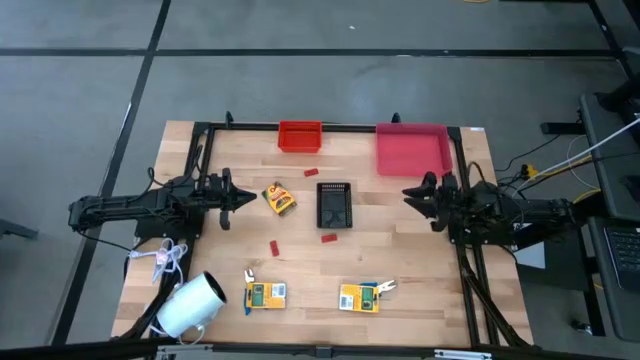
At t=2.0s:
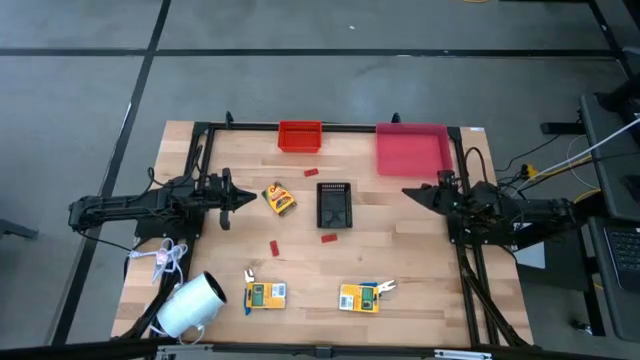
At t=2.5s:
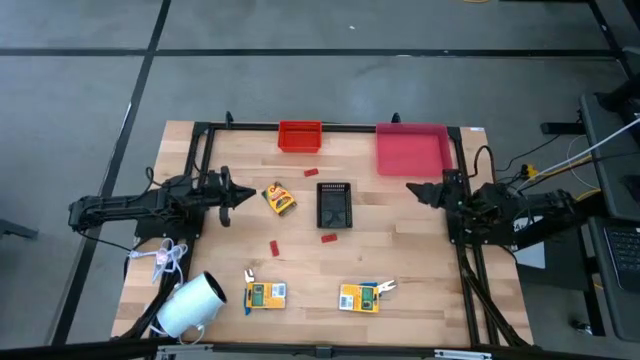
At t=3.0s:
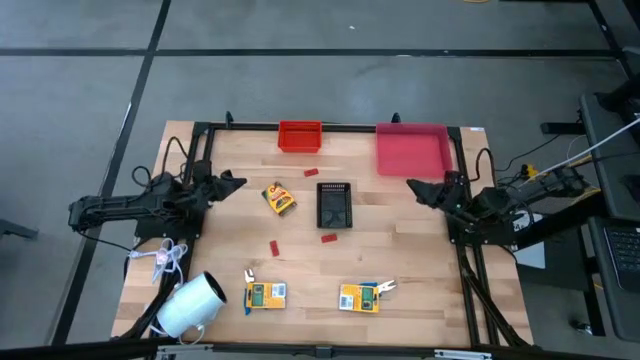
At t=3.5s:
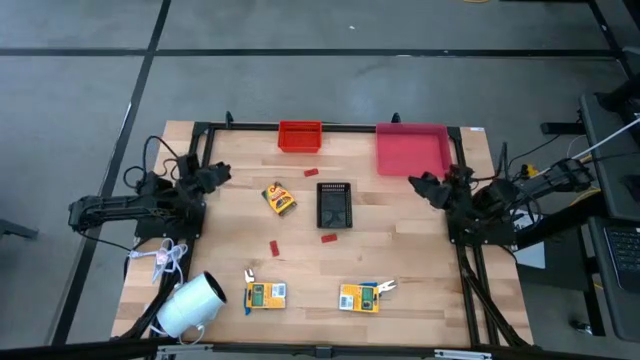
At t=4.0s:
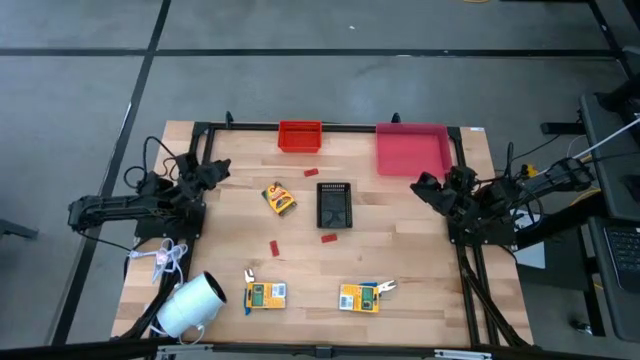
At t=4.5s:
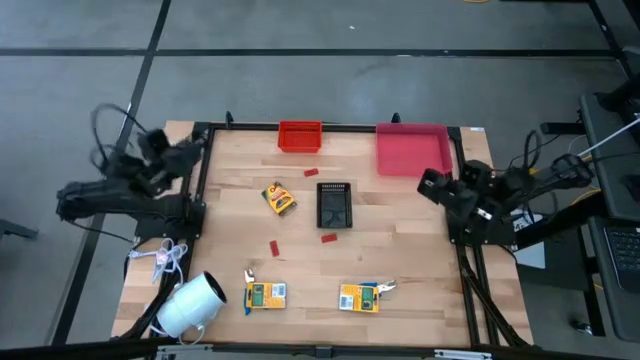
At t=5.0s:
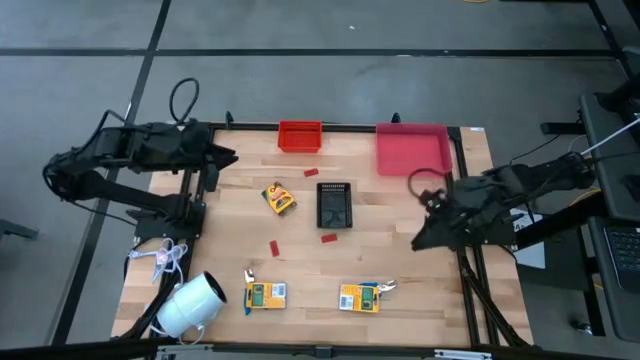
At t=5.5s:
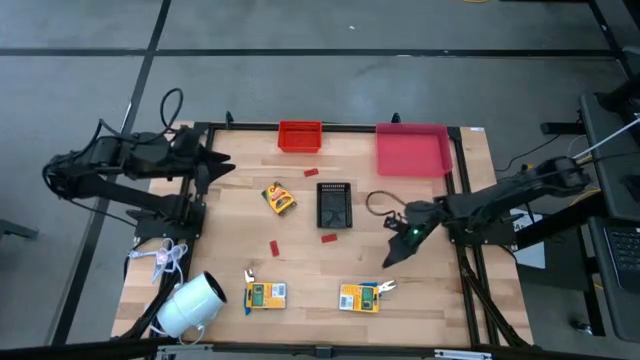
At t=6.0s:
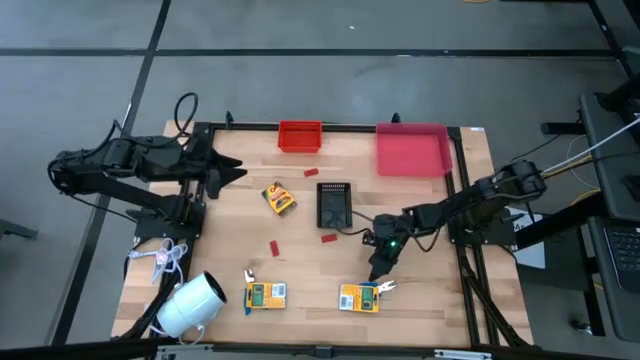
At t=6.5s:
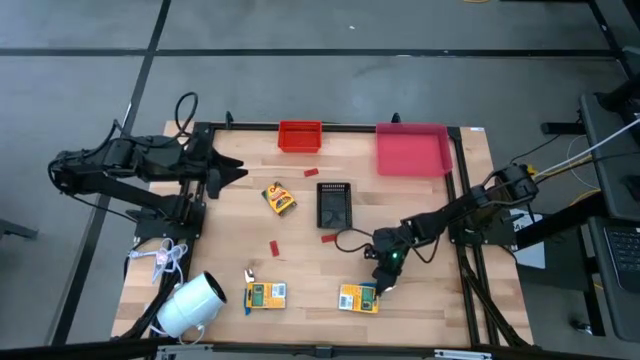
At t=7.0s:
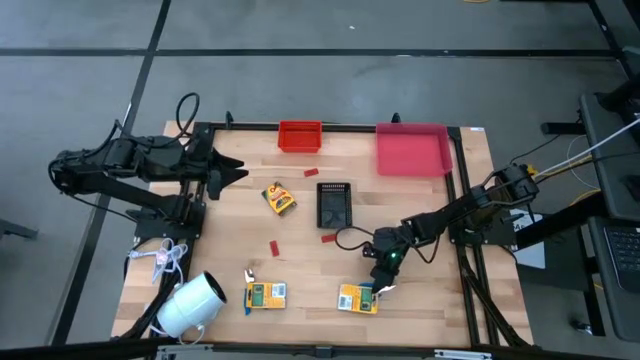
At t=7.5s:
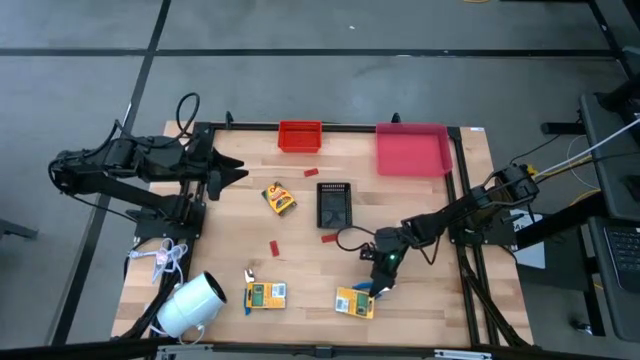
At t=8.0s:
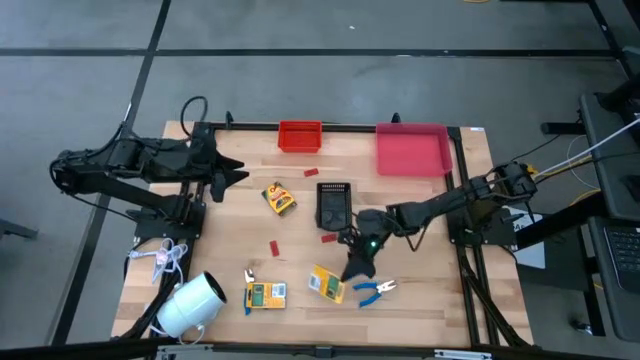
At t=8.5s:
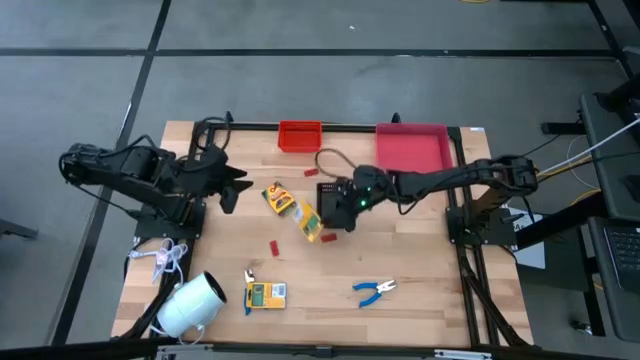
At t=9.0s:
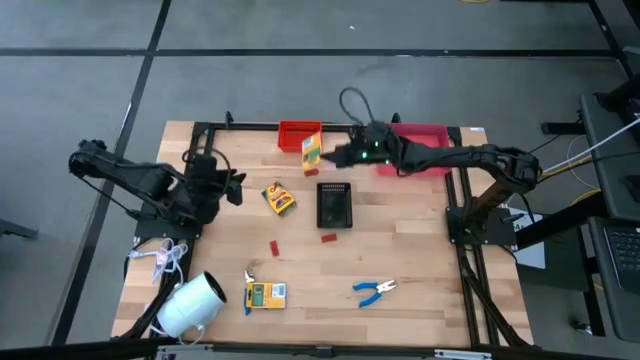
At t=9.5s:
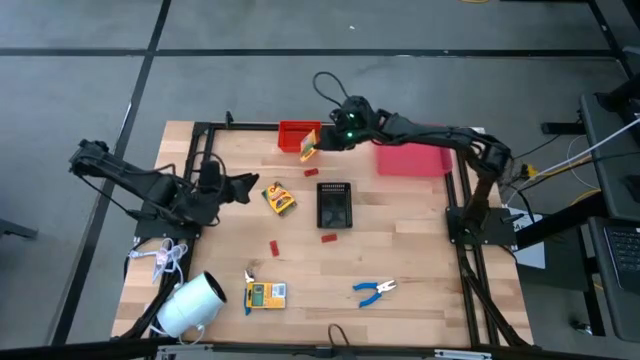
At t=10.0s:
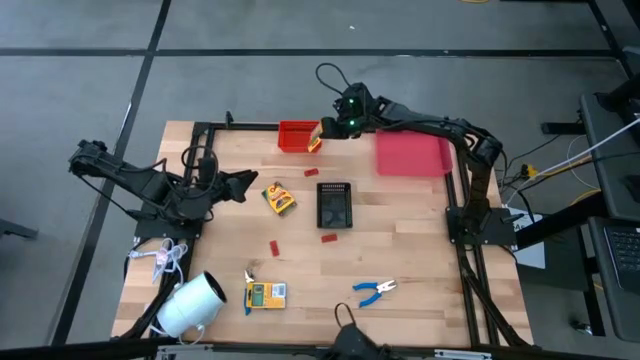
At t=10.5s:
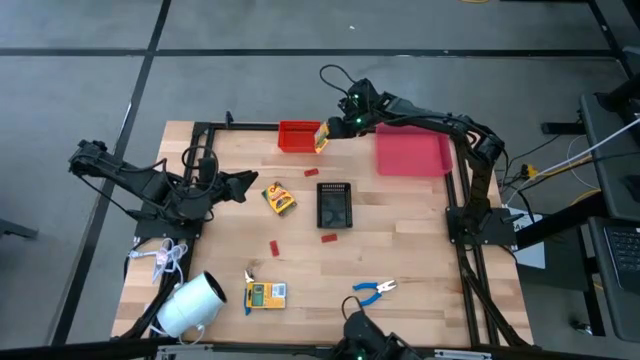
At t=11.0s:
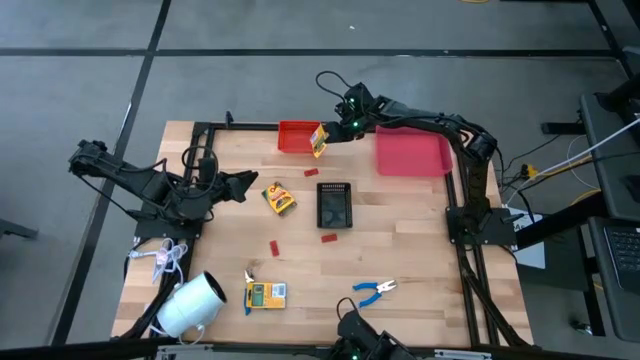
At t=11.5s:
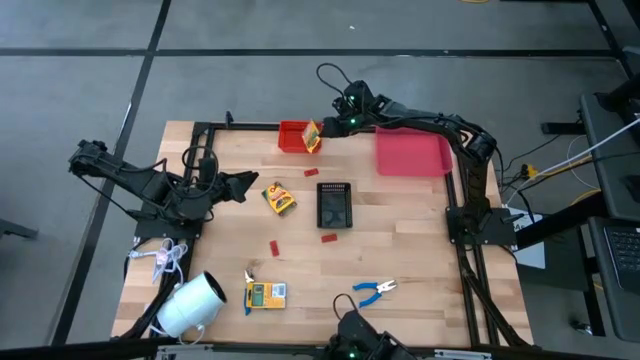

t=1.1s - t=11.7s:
Task: Pick & Place School Supplies
Put the yellow crayon box into the red bin

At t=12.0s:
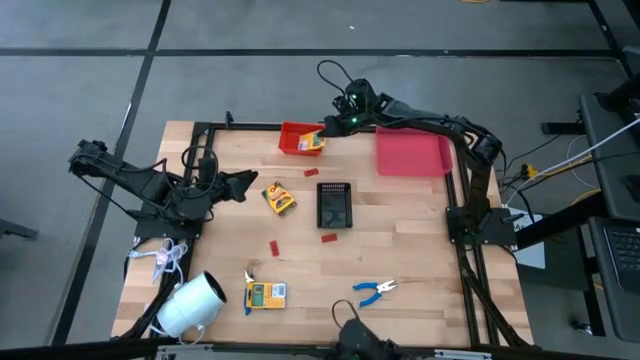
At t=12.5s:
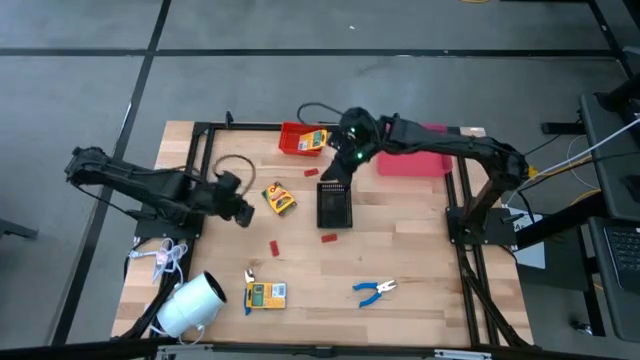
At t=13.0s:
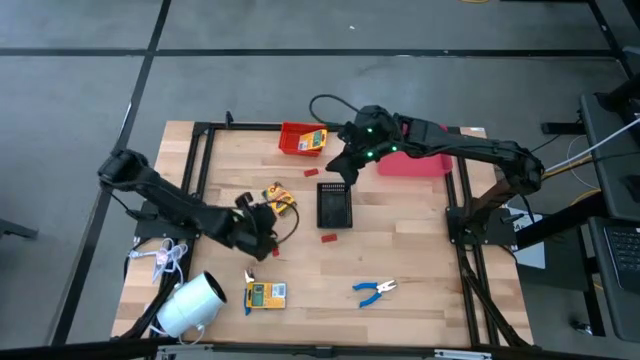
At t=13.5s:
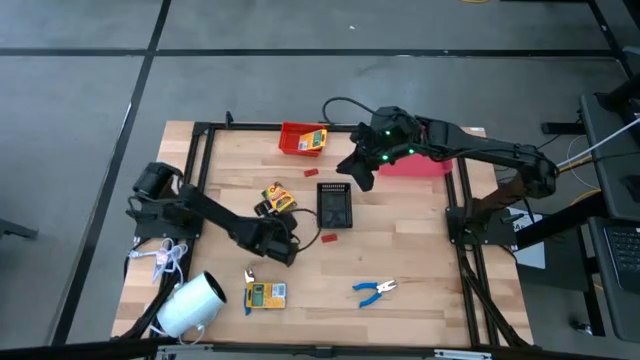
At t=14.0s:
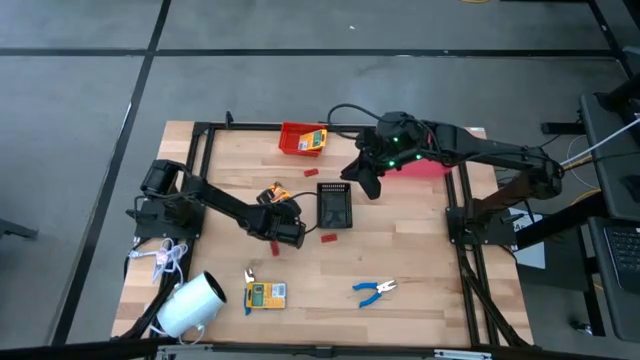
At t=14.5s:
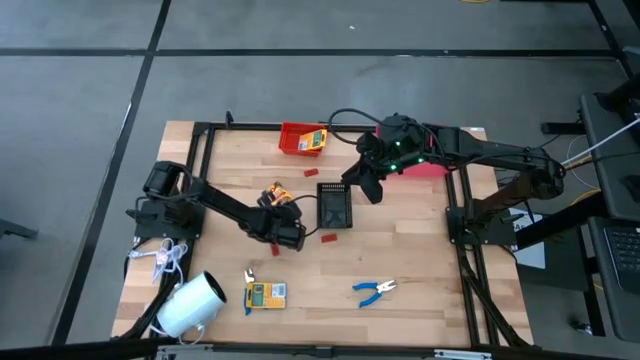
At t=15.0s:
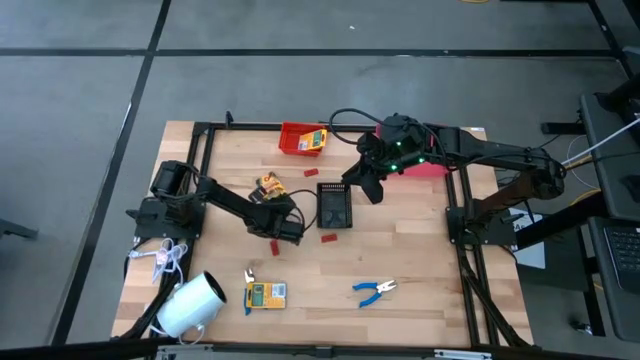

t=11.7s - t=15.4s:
Put the yellow crayon box into the red bin

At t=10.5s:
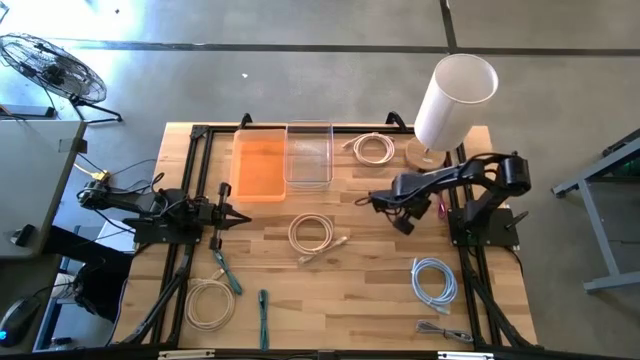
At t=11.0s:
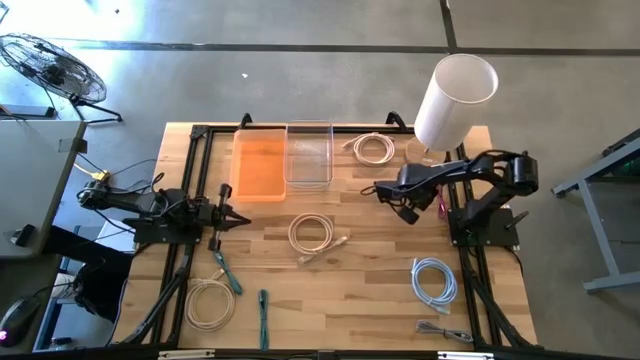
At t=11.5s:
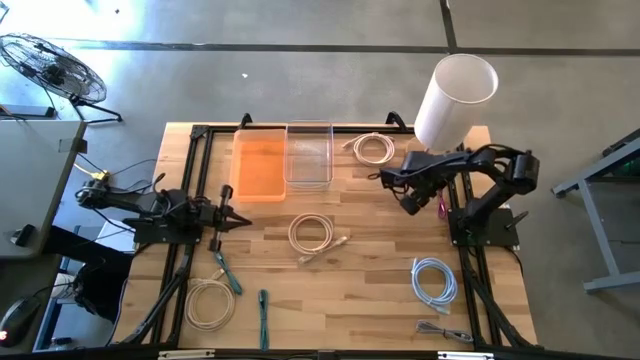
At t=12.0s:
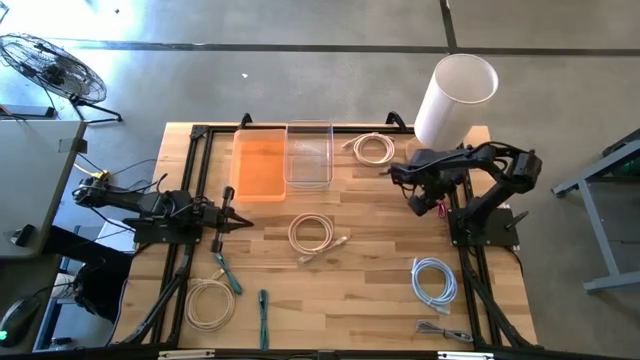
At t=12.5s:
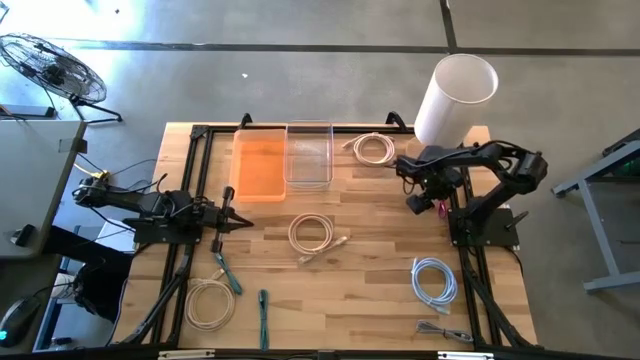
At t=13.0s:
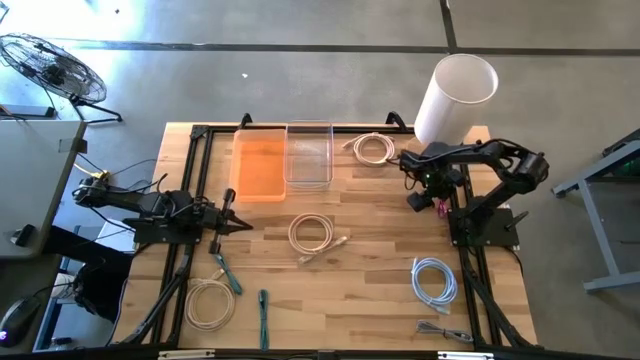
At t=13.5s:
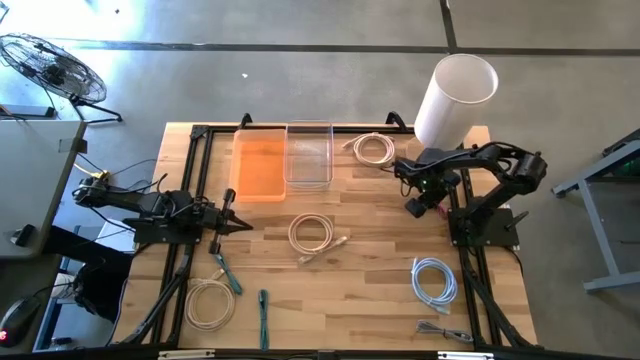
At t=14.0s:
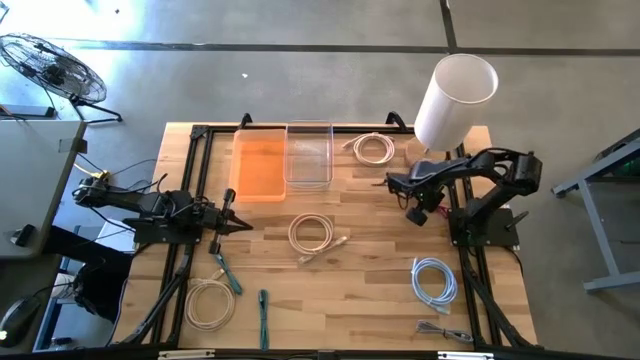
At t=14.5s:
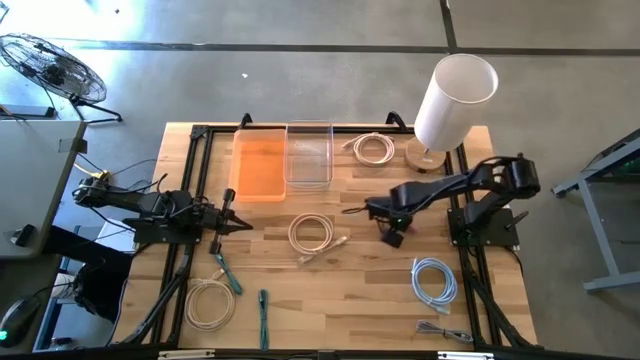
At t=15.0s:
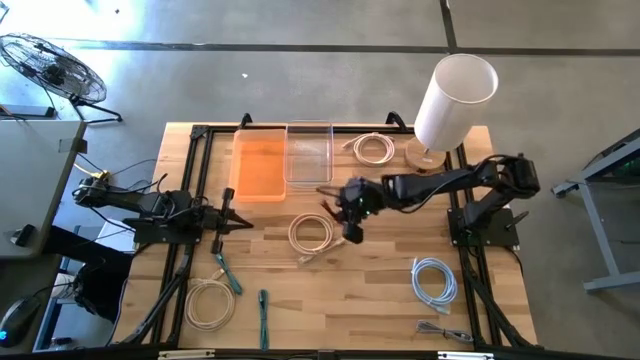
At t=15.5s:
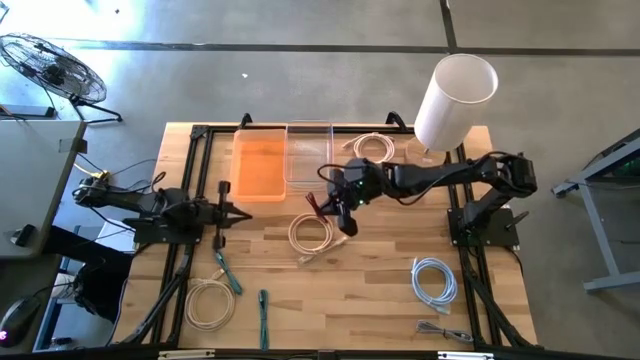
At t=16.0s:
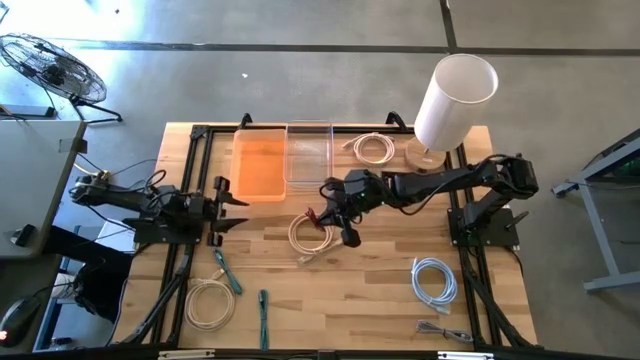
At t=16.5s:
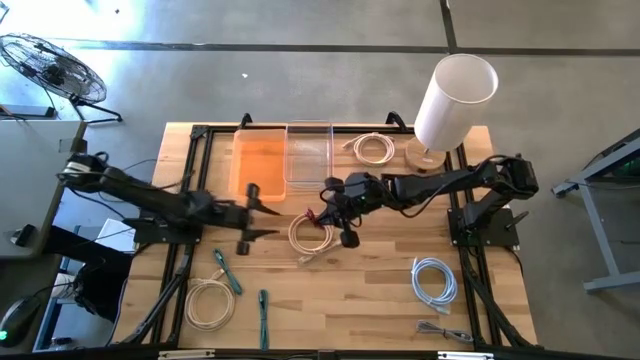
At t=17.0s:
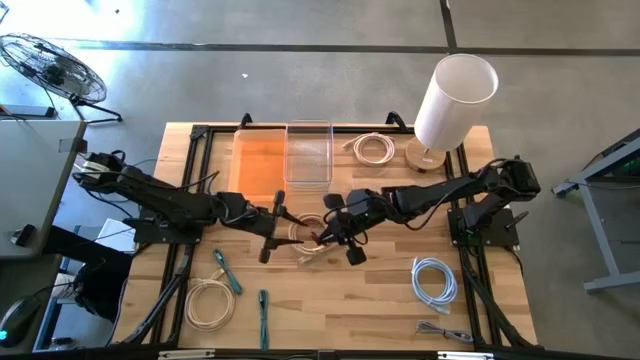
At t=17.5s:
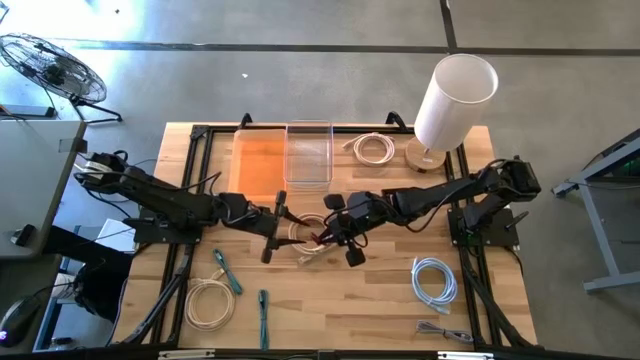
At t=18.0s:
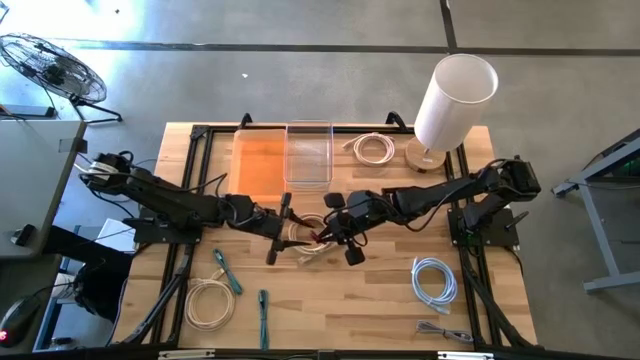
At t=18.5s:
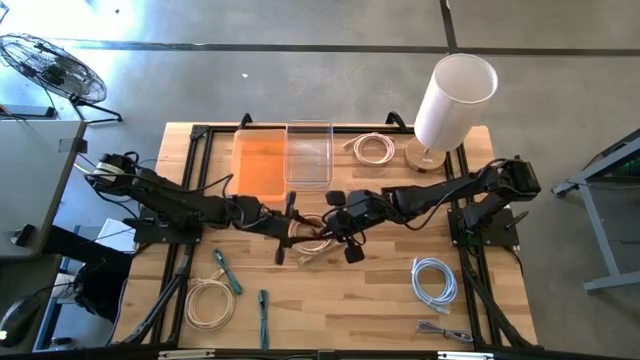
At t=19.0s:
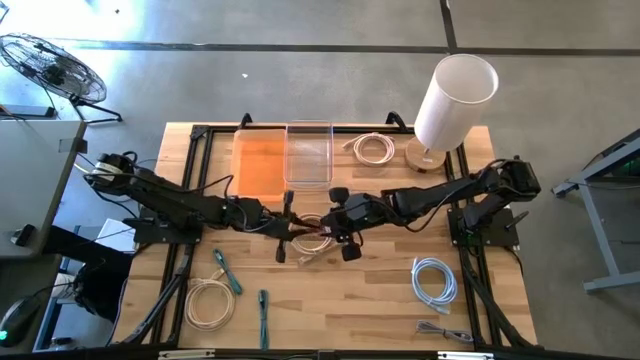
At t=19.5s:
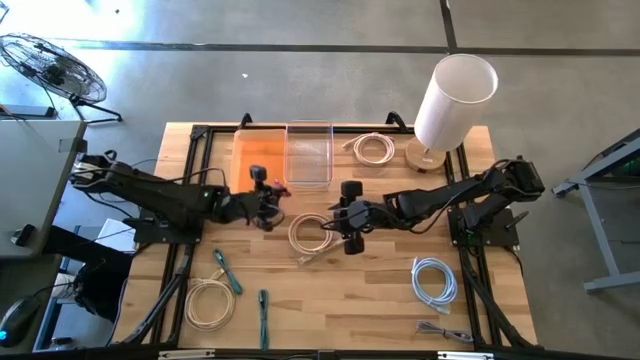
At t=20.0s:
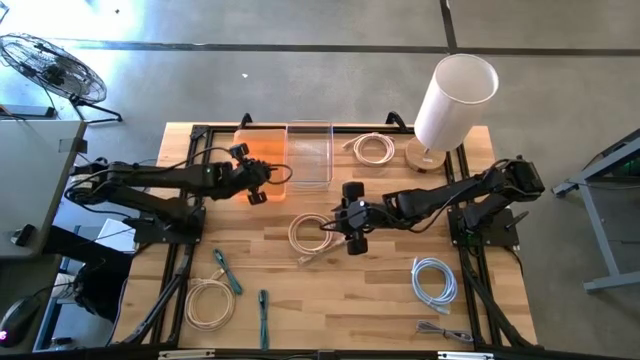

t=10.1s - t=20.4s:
Task: Pick & Place USB Port
Put the pink and black charger cable into the orange bin
